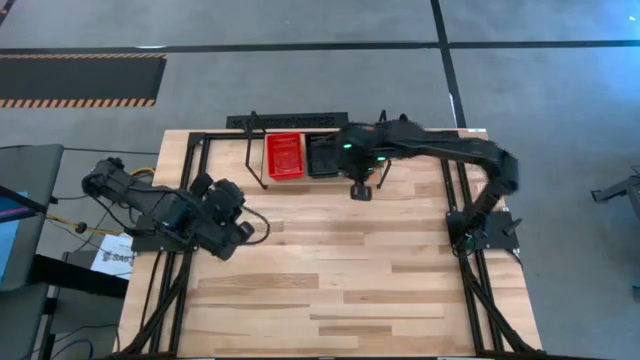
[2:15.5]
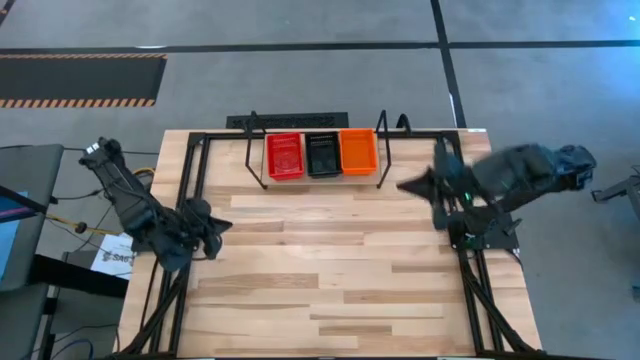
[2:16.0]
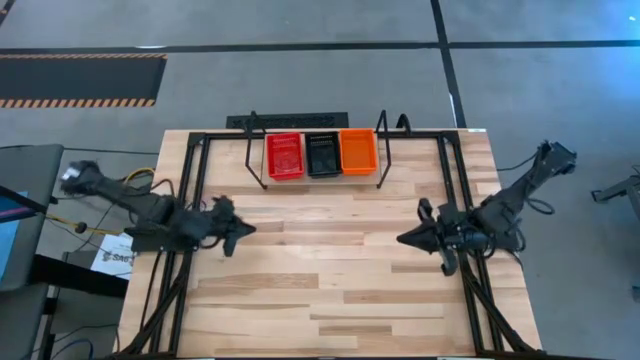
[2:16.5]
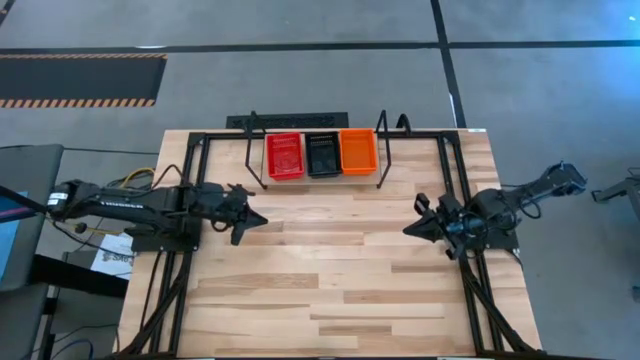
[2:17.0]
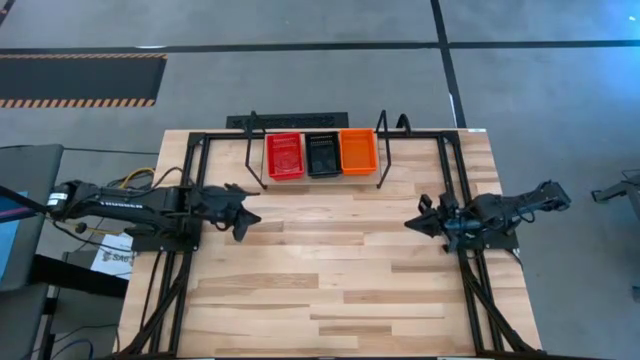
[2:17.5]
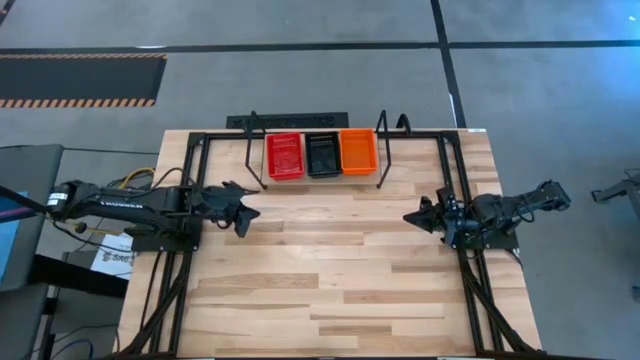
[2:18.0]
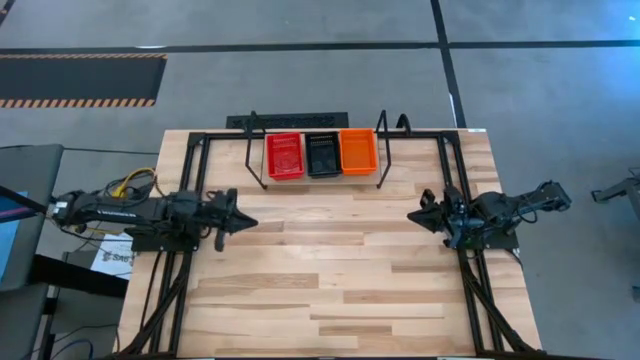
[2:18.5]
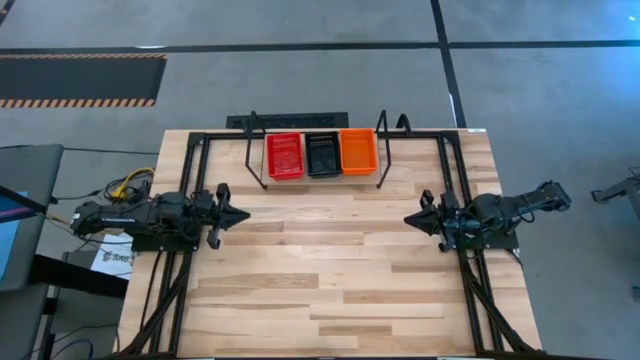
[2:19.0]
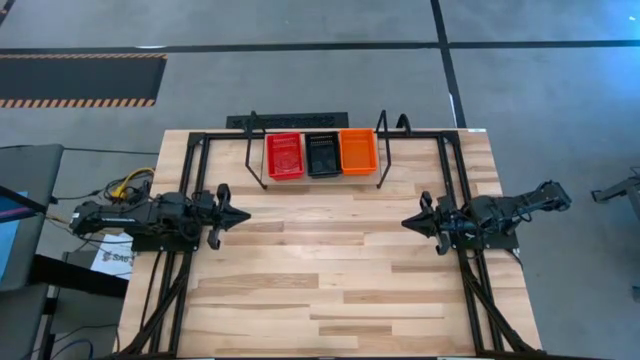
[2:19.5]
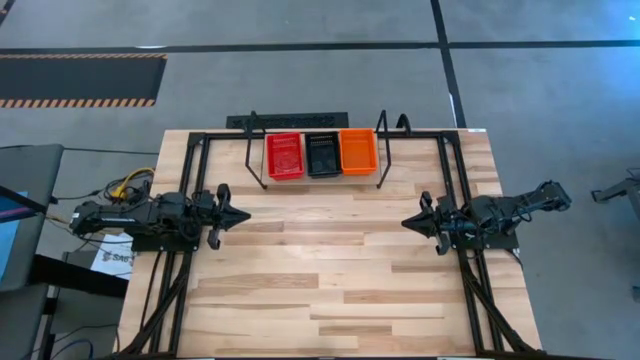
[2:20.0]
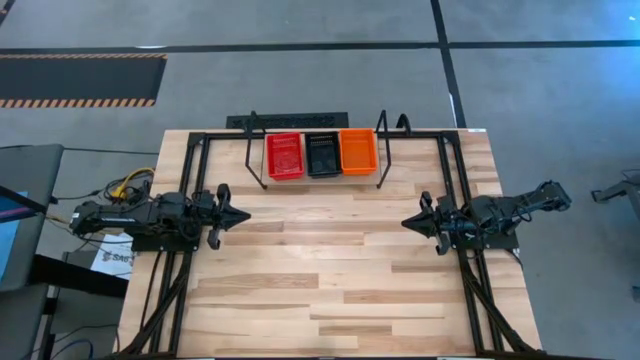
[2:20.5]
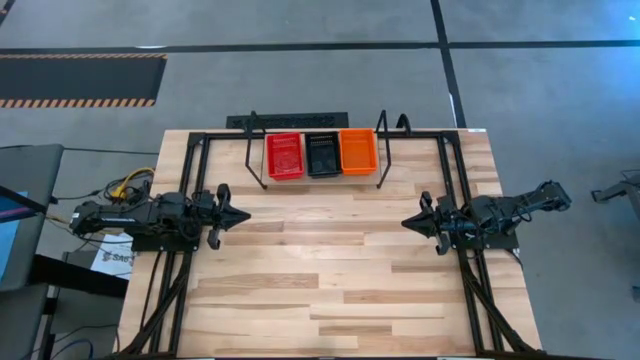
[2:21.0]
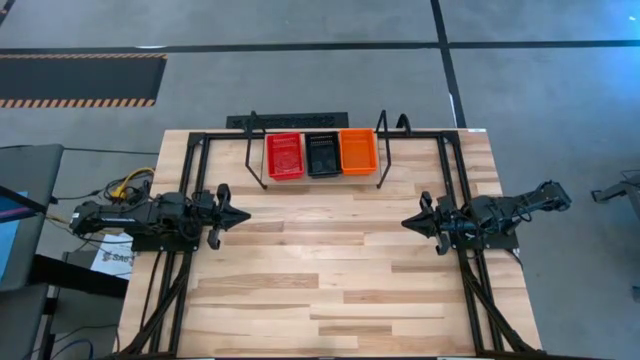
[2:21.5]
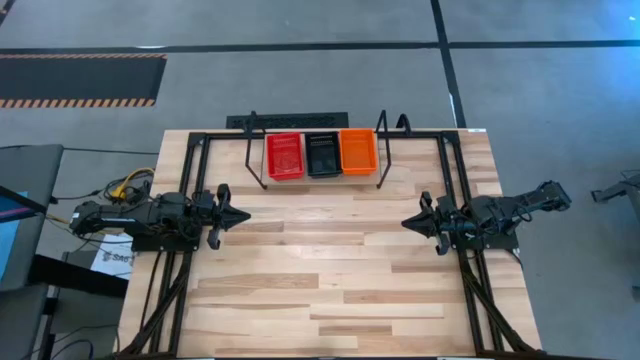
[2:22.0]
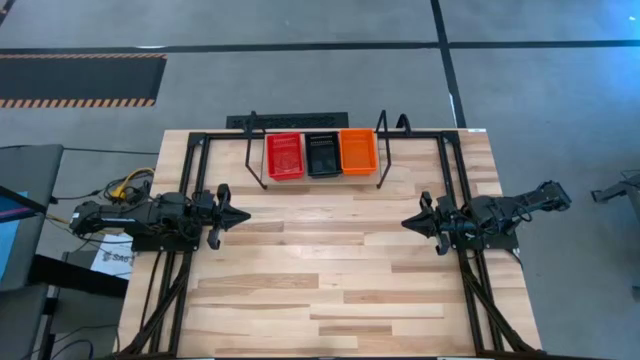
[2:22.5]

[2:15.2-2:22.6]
Task: Stack baskets on shelf by color
Return to Home Position

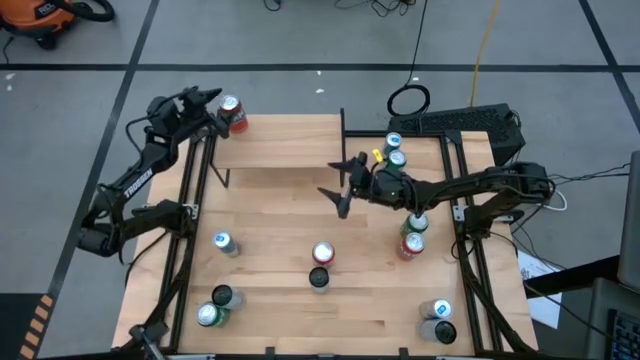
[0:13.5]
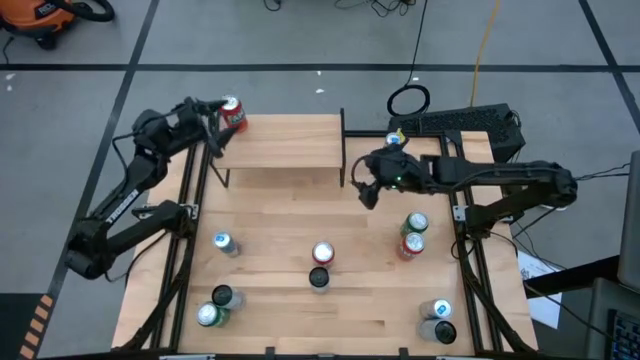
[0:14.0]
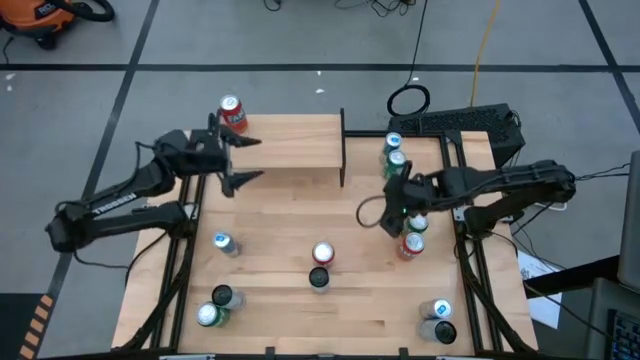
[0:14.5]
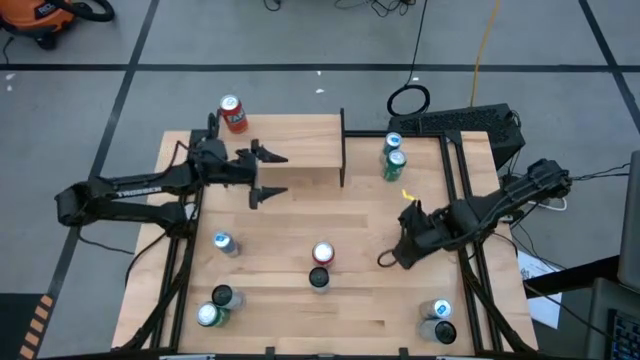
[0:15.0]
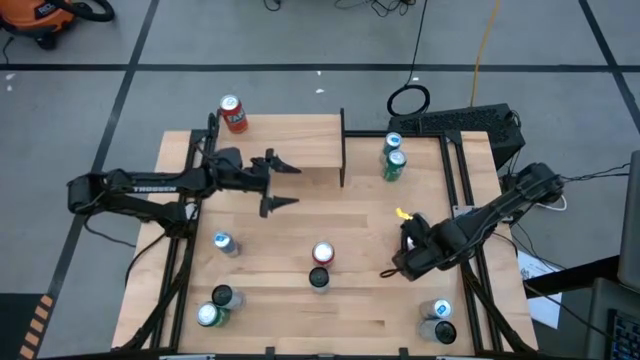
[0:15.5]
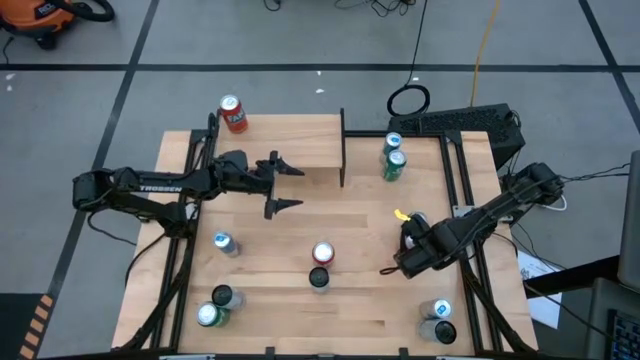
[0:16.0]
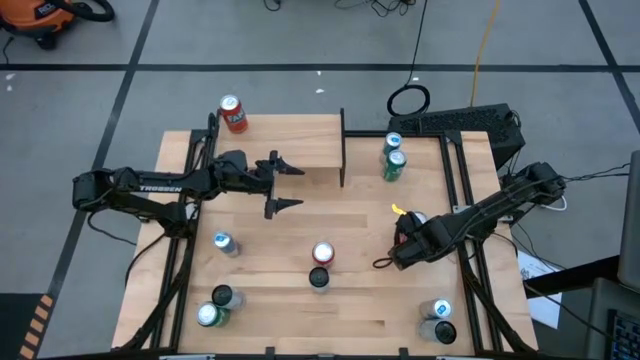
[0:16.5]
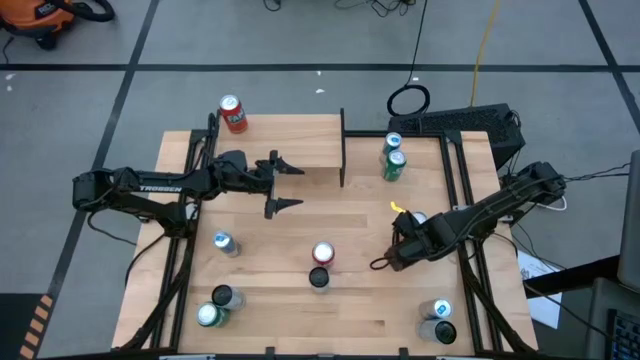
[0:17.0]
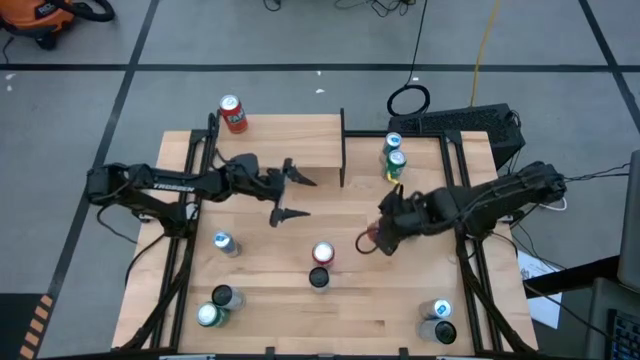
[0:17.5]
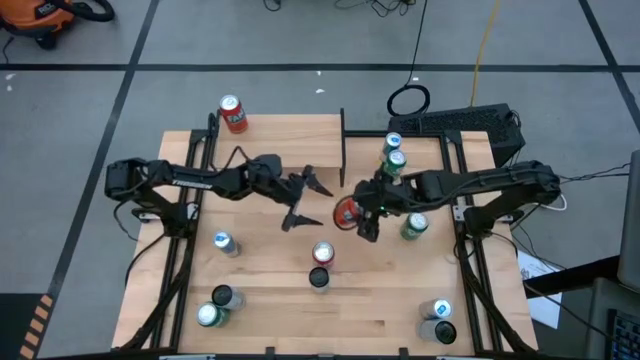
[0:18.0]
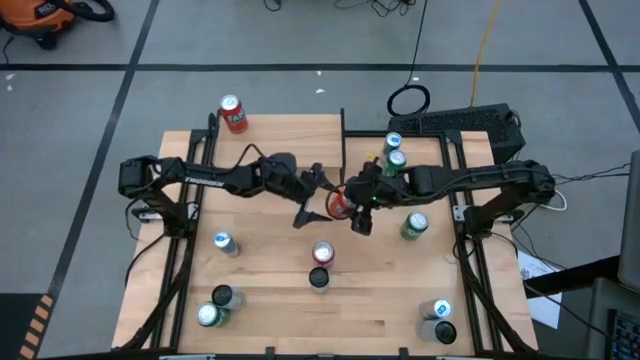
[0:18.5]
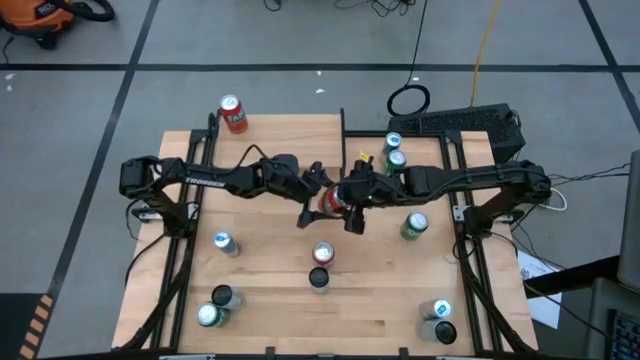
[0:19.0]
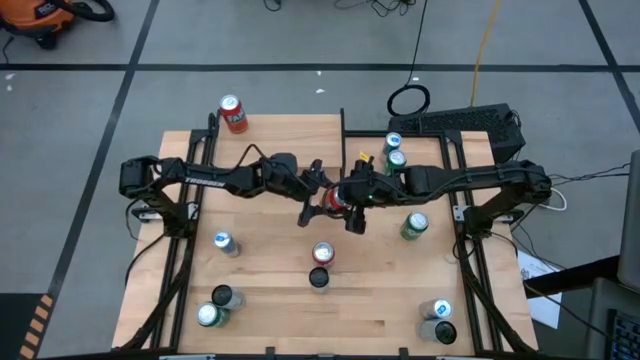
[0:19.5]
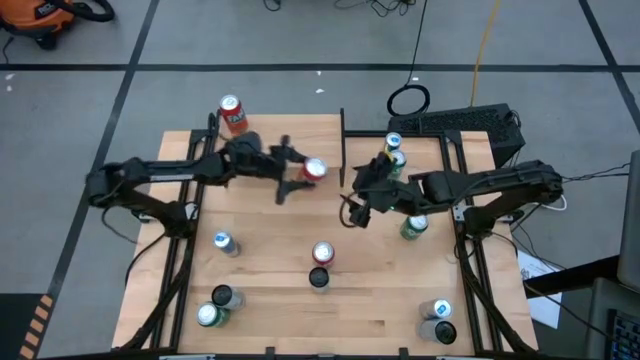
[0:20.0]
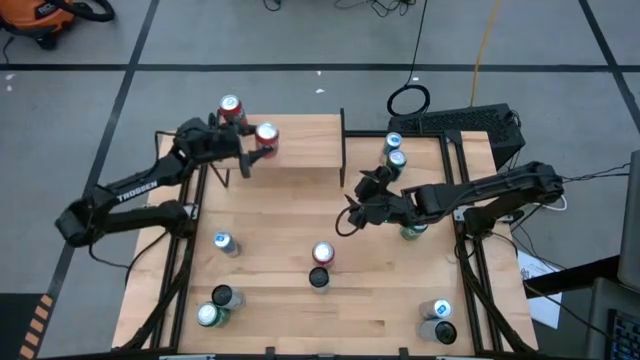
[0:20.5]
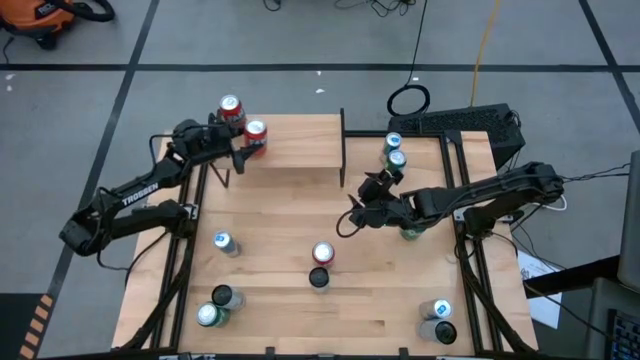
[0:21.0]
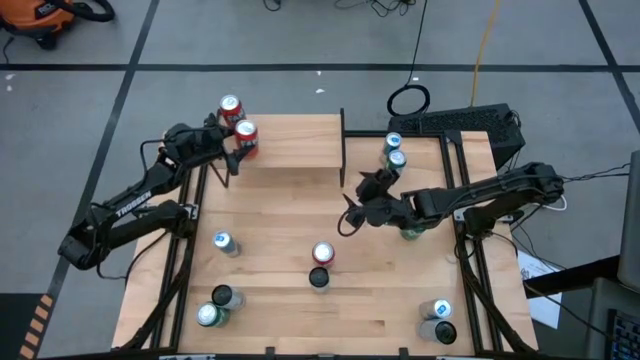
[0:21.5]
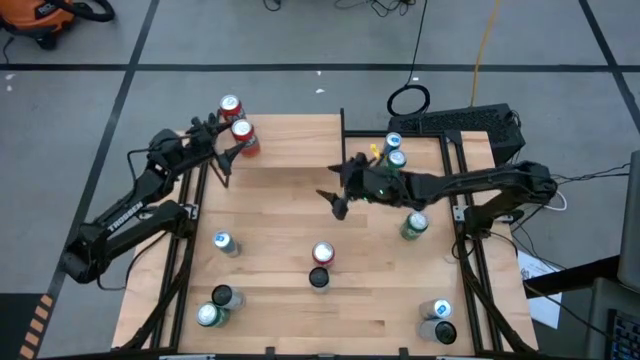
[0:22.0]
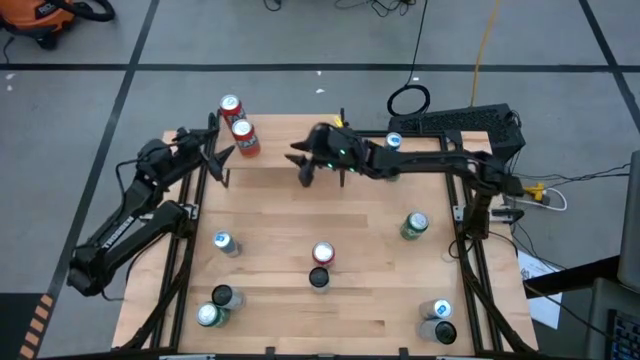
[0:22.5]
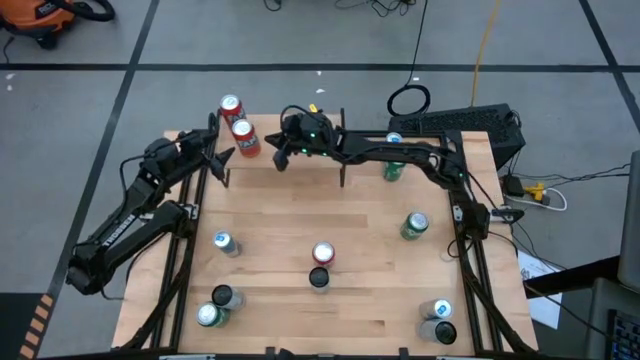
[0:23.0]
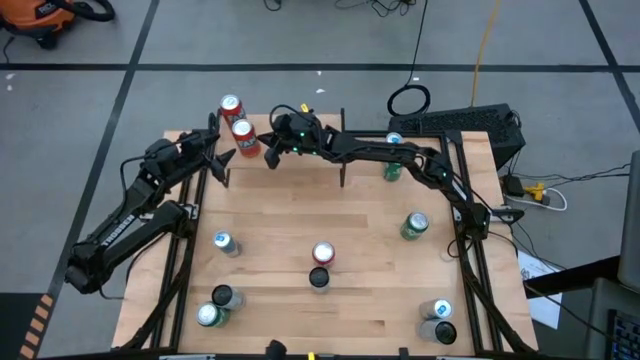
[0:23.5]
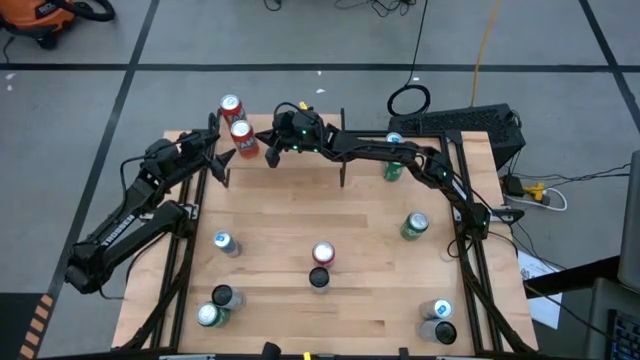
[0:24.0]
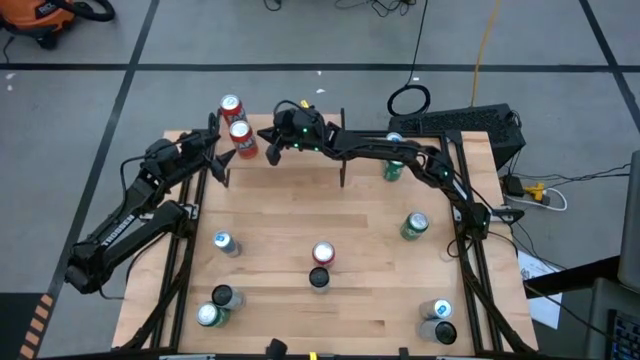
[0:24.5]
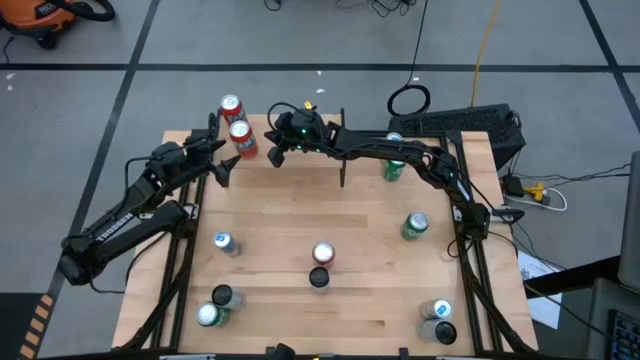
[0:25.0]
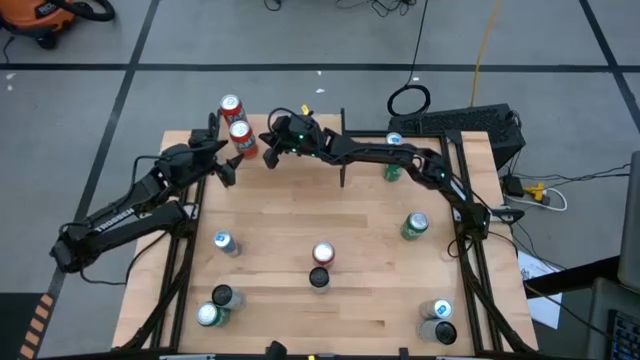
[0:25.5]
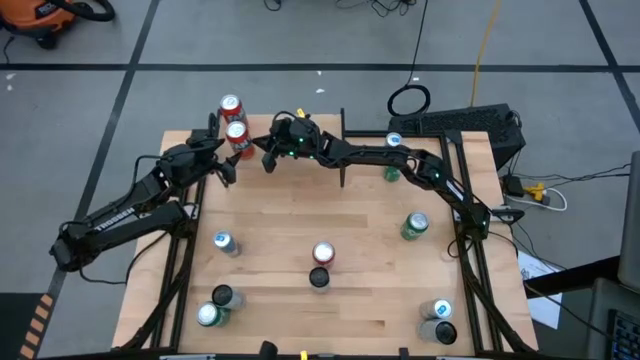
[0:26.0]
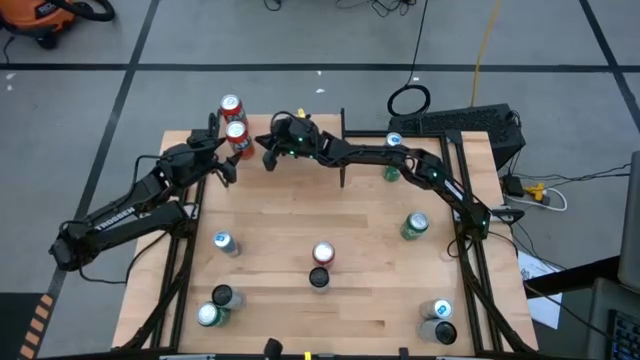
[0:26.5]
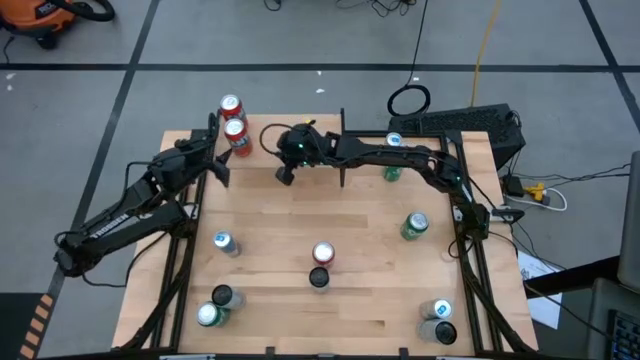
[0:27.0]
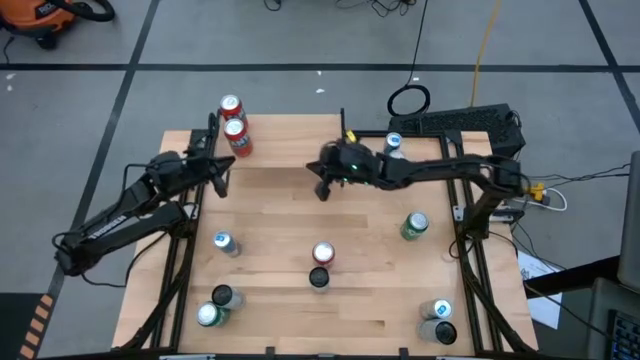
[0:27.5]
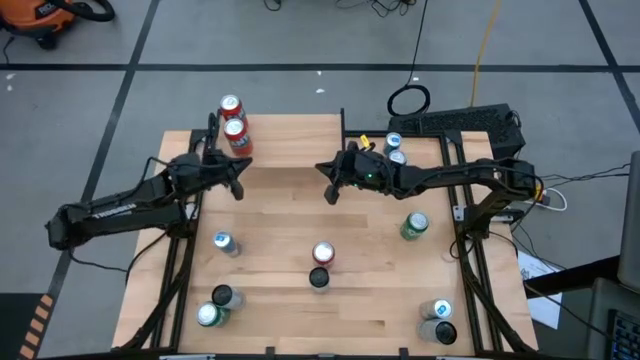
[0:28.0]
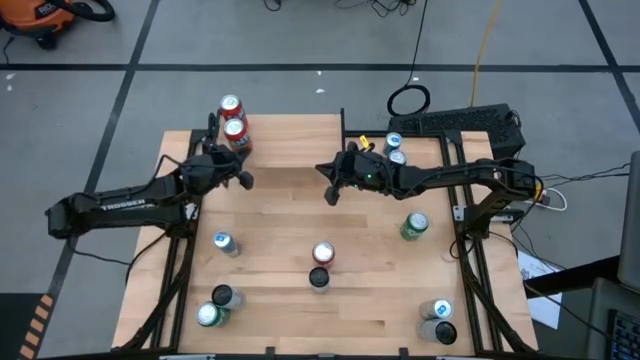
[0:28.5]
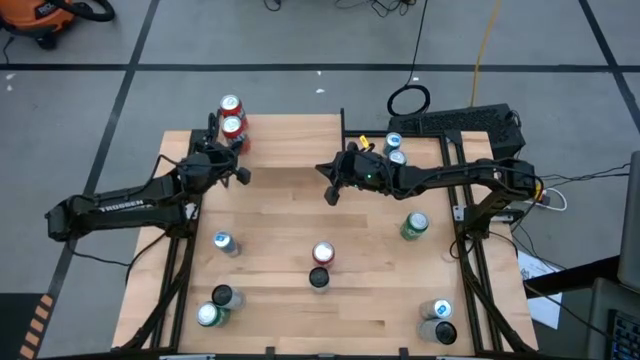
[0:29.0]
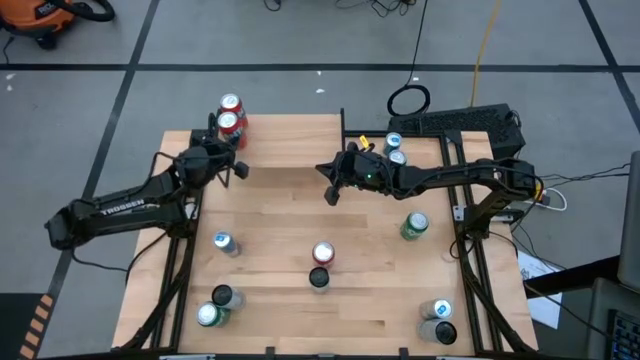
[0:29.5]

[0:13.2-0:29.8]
Task: Place canned beverage on shelf
Put the right orange soda can on the shelf
